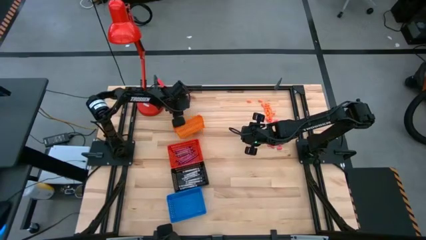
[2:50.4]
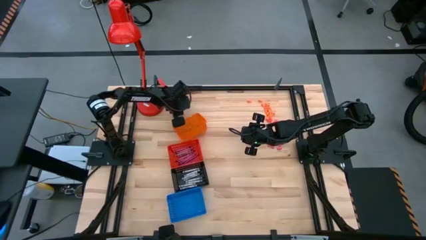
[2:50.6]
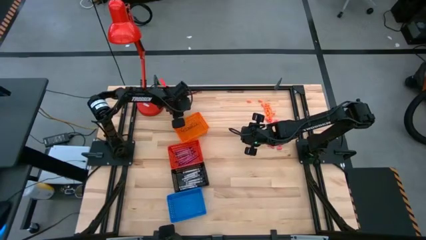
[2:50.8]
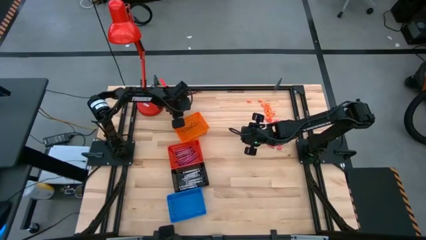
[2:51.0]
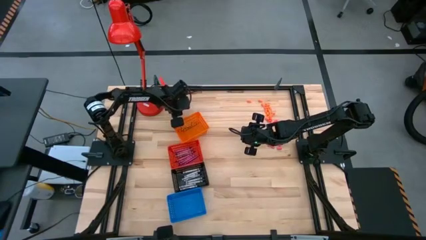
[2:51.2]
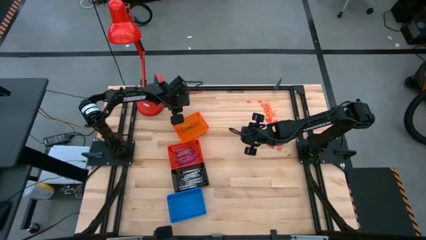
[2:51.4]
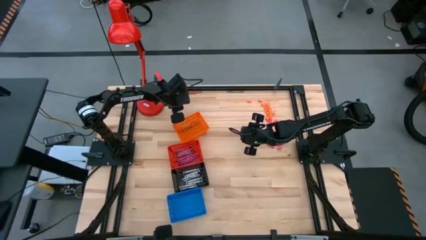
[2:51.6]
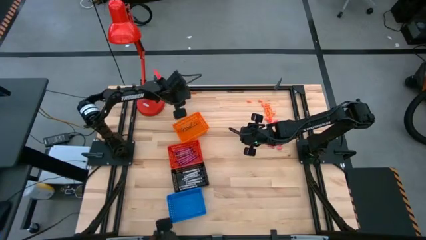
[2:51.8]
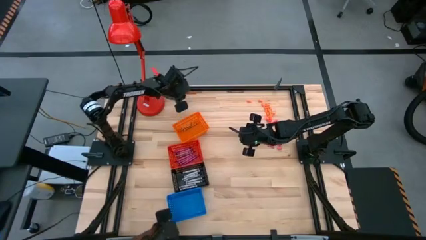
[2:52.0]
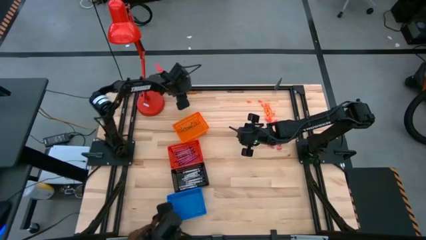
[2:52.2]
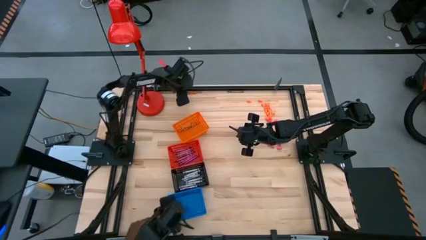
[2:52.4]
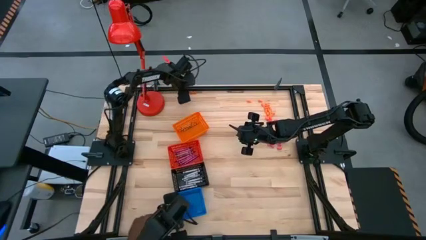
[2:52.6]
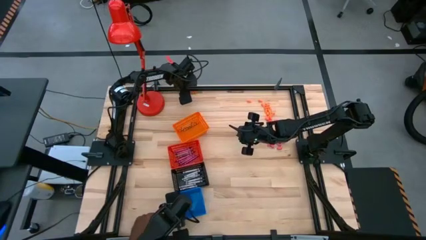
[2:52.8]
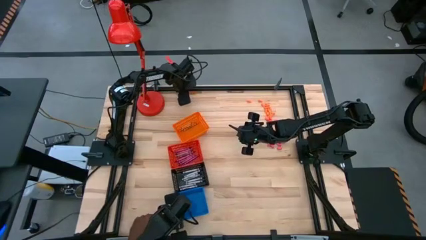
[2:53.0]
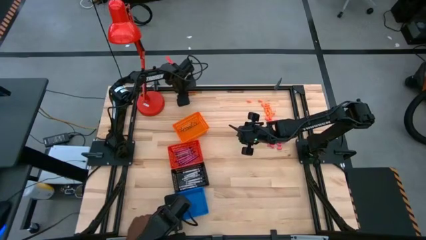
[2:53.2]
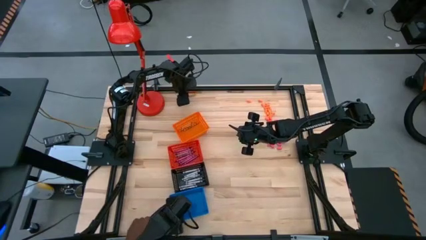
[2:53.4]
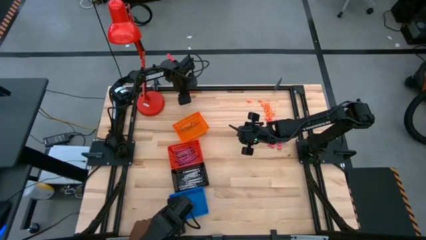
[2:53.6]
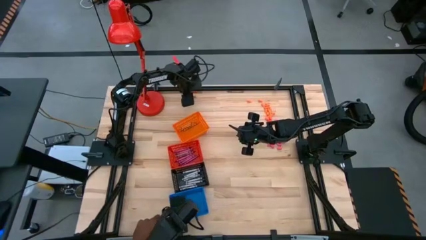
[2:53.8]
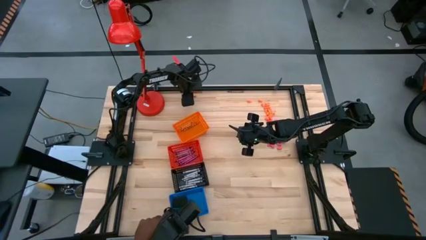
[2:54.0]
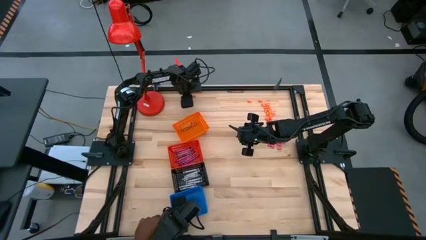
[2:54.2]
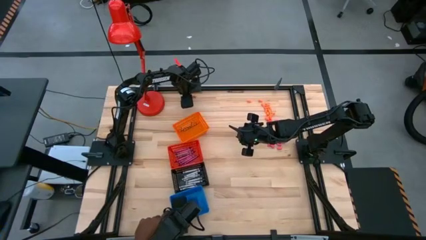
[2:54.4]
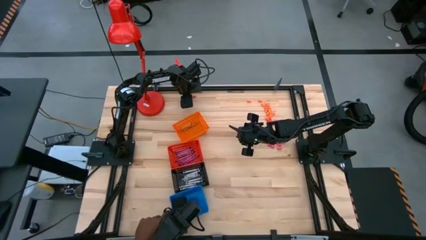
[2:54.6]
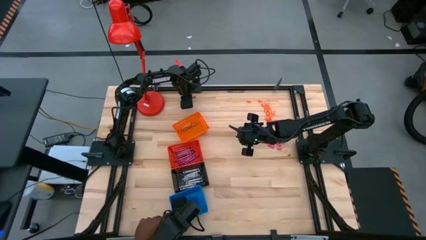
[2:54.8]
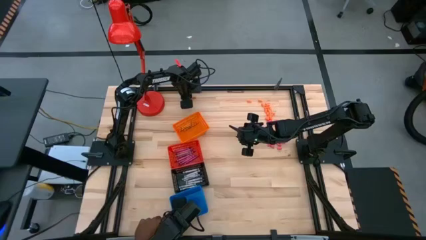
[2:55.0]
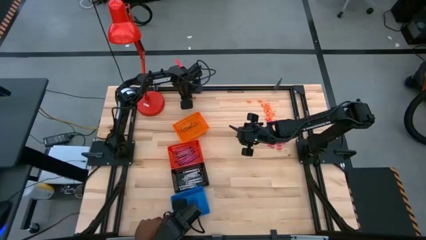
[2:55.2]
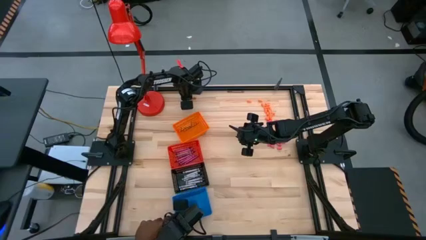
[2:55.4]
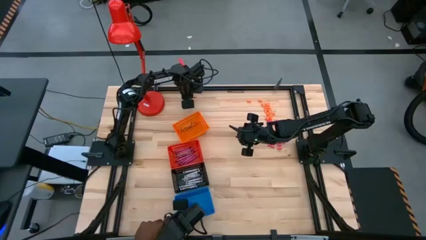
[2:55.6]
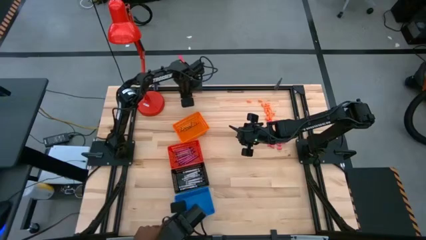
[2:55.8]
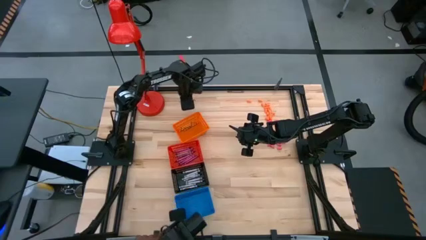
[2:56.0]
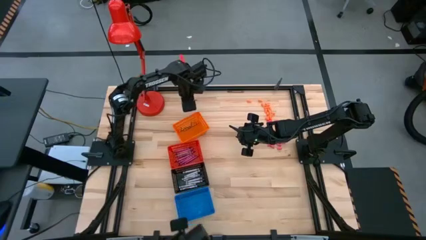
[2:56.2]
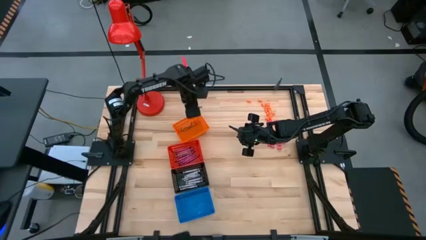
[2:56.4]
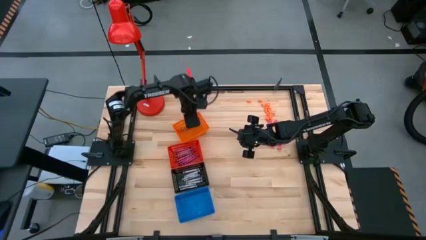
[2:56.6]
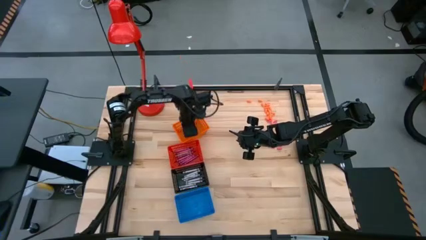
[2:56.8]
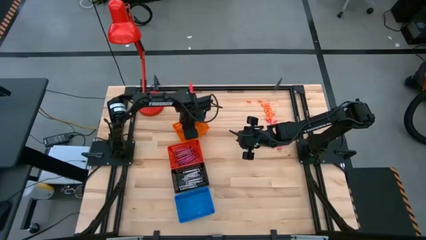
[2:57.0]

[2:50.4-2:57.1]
Task: Sort crayons
Put the orange crayon into the orange basket

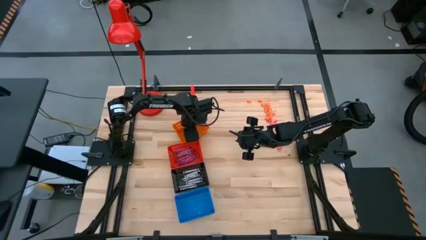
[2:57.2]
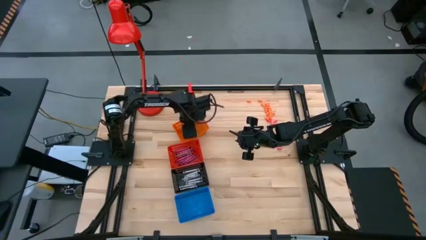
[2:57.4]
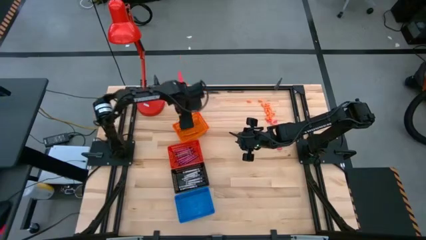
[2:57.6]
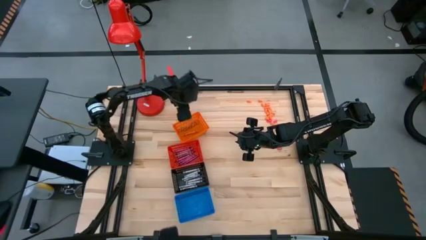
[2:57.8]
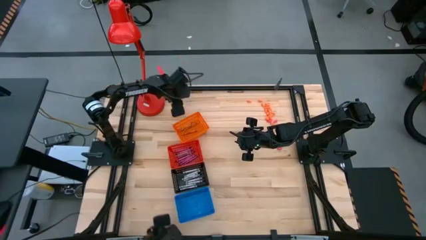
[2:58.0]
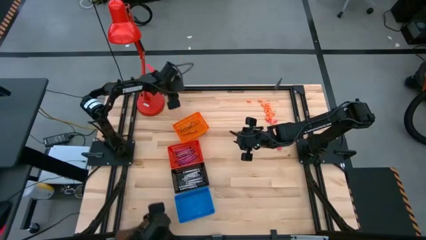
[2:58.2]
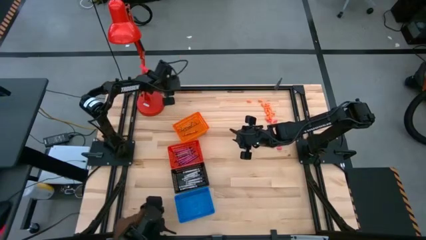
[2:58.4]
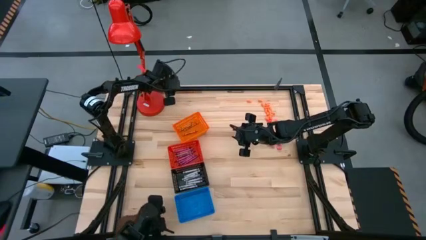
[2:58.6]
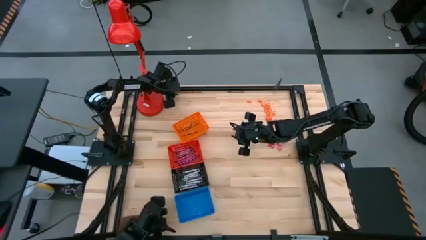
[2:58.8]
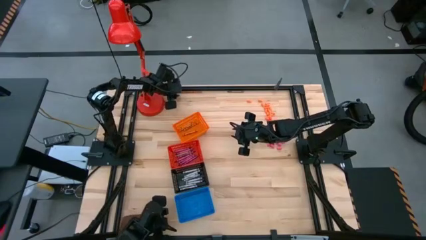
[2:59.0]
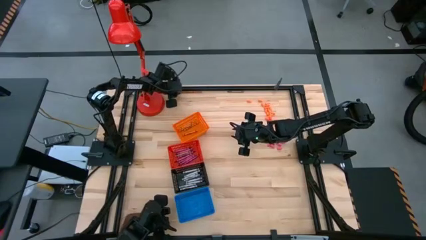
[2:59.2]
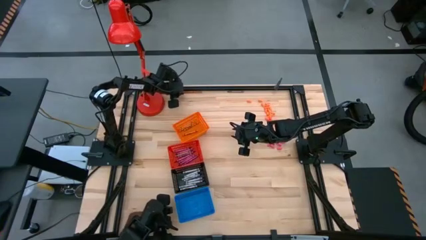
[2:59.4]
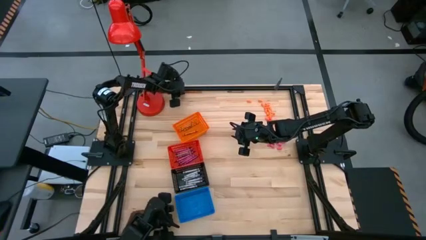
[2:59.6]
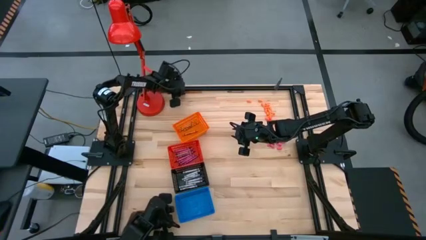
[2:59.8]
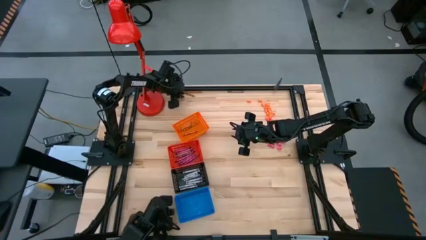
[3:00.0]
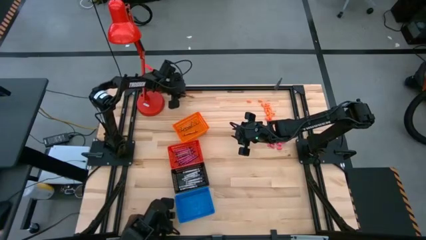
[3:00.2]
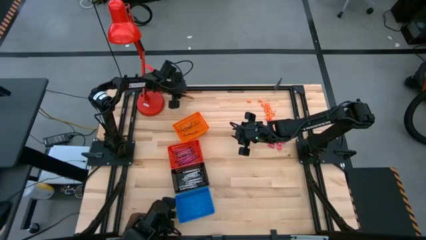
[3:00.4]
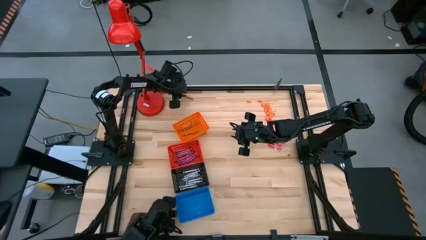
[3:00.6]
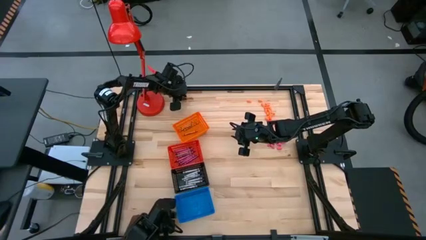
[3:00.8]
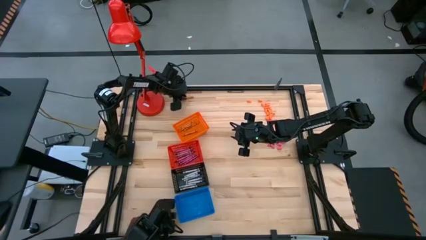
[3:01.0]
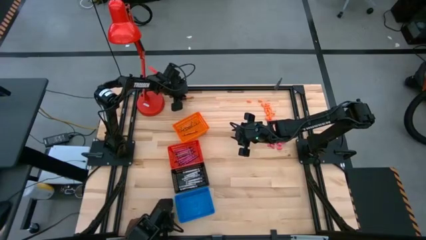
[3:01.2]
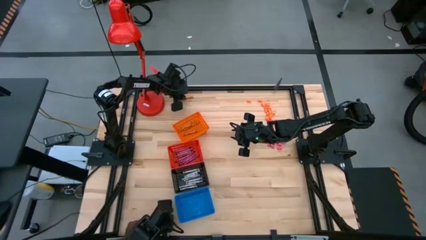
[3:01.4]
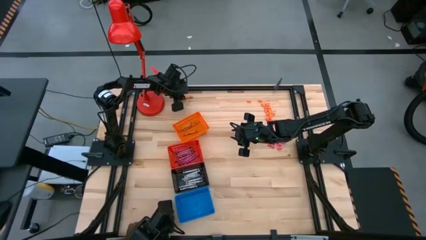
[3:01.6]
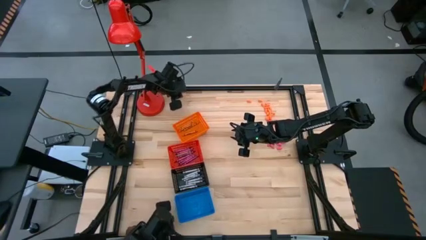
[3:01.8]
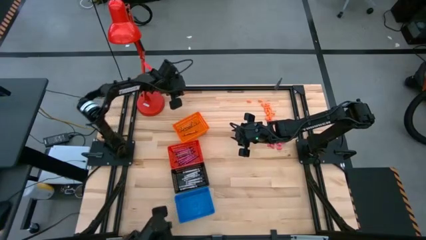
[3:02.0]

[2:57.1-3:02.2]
Put the orange crayon into the orange basket

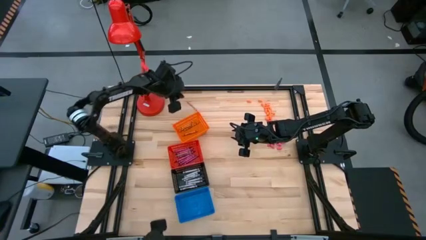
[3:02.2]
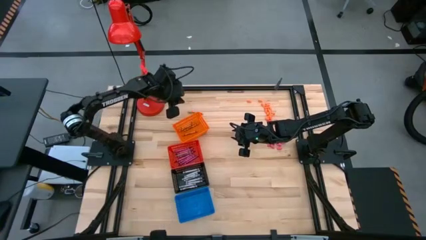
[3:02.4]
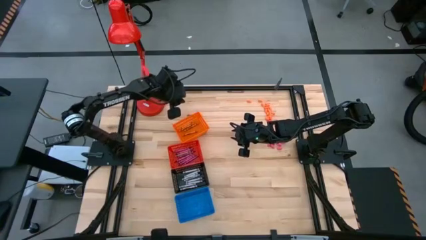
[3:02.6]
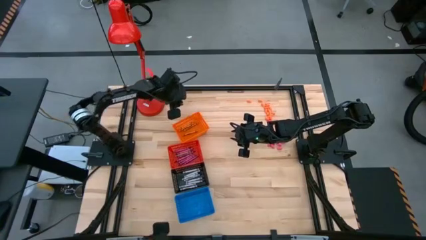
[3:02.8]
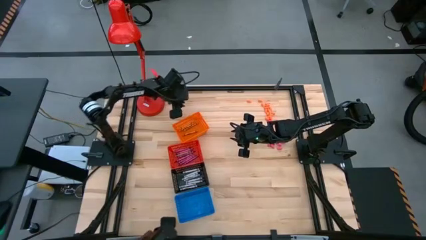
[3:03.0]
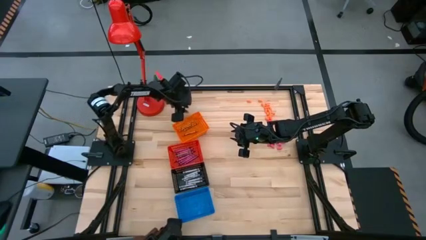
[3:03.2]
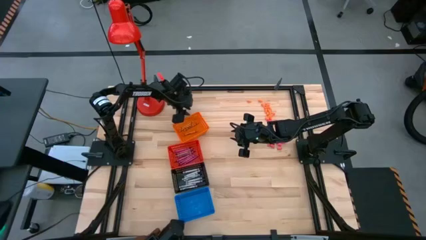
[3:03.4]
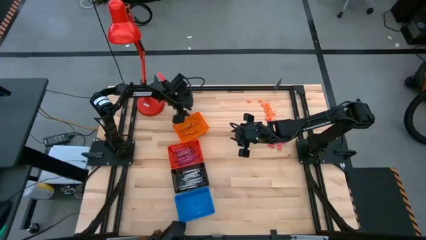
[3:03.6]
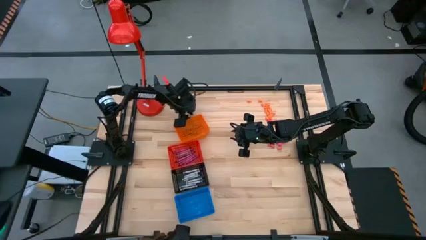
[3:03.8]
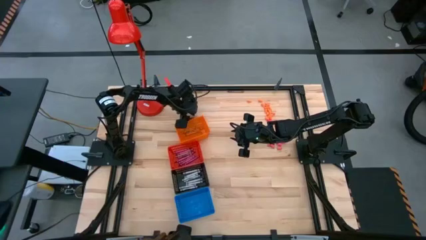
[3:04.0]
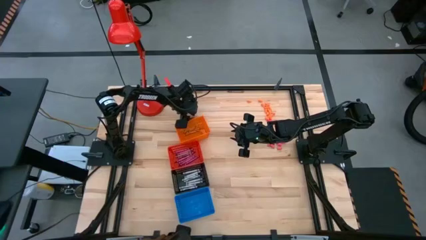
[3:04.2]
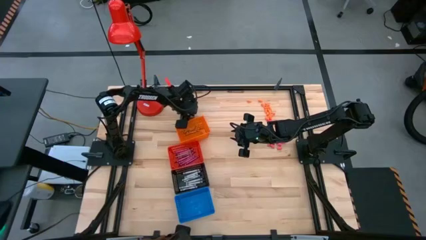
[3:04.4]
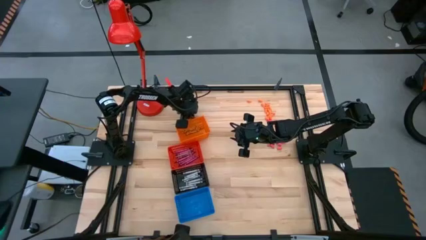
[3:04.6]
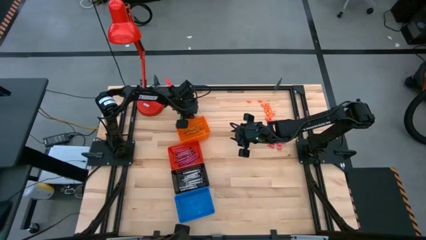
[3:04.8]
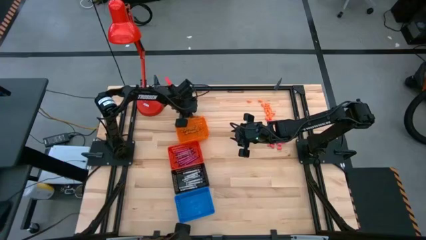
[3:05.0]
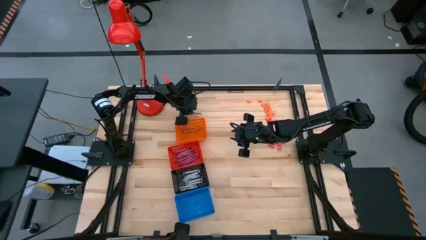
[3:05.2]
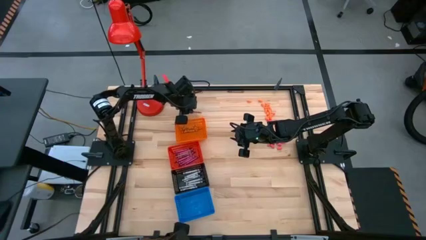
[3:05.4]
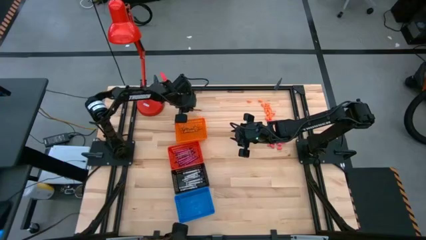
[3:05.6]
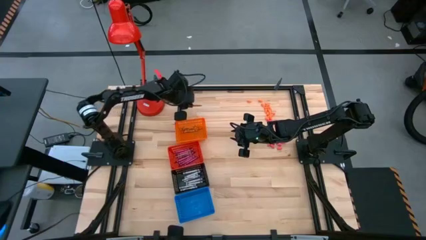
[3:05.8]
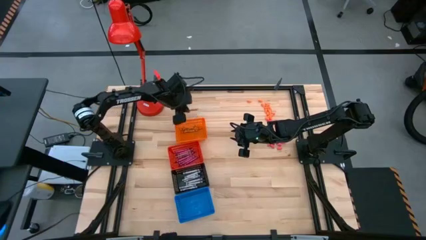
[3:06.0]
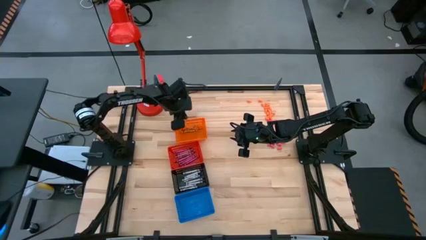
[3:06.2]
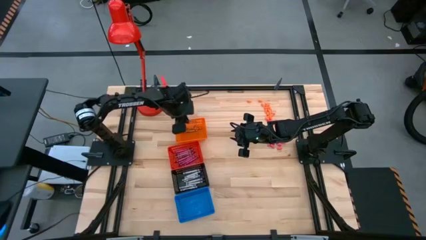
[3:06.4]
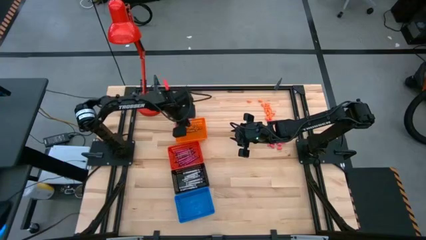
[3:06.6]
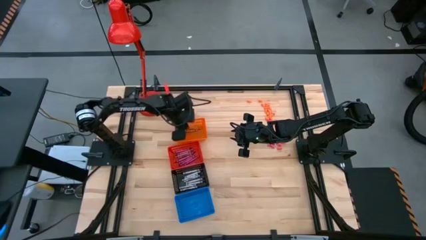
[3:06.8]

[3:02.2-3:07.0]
Put the orange crayon into the orange basket
